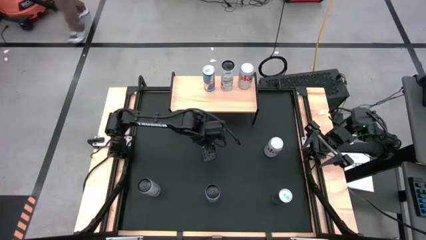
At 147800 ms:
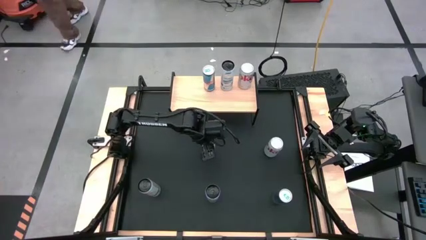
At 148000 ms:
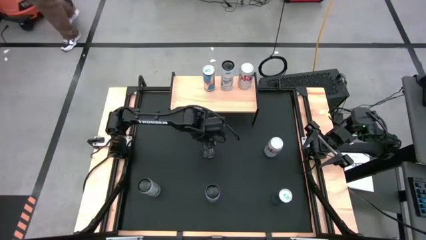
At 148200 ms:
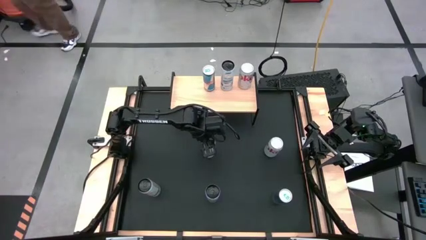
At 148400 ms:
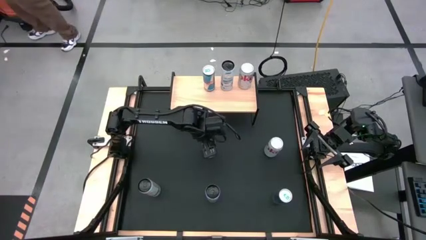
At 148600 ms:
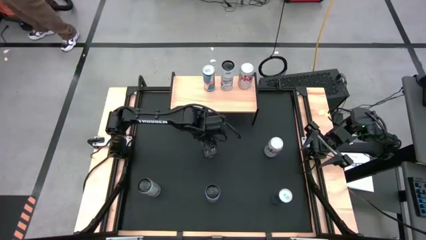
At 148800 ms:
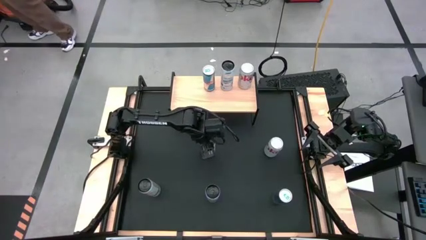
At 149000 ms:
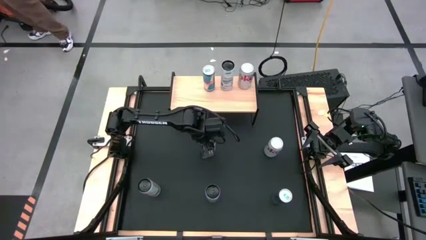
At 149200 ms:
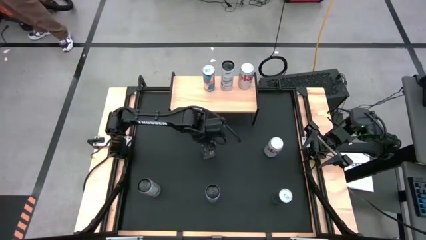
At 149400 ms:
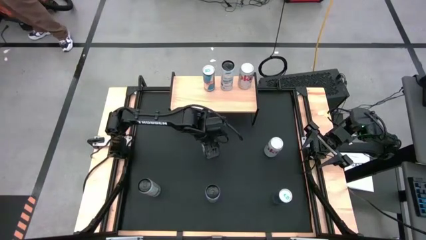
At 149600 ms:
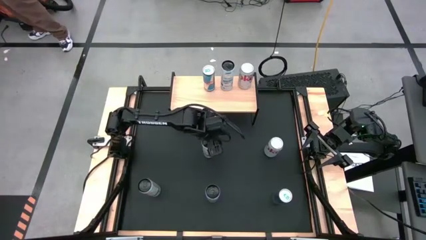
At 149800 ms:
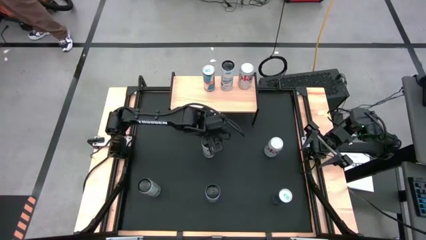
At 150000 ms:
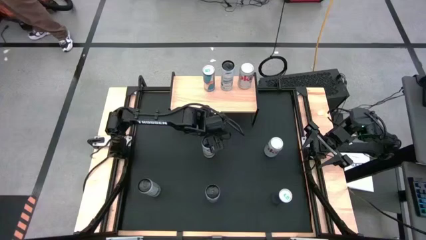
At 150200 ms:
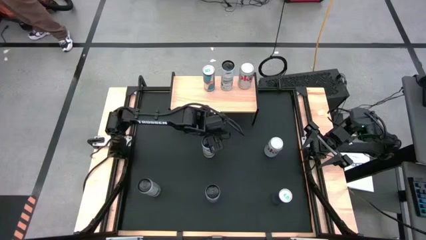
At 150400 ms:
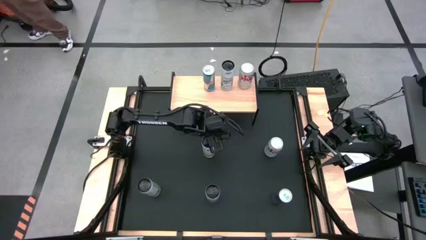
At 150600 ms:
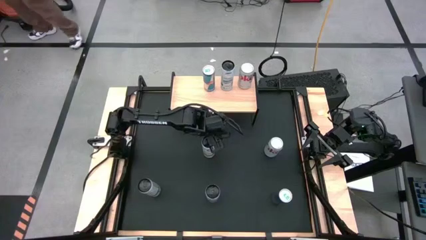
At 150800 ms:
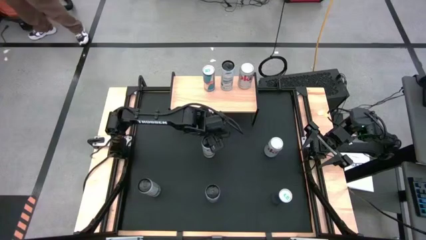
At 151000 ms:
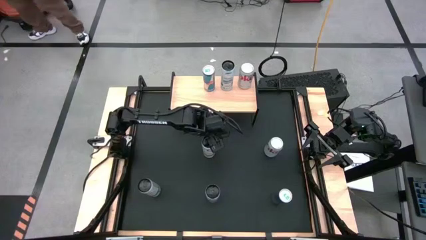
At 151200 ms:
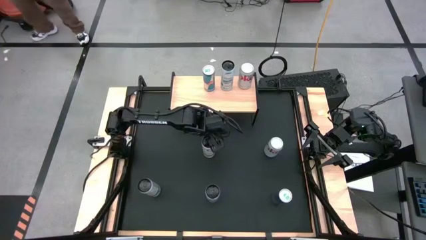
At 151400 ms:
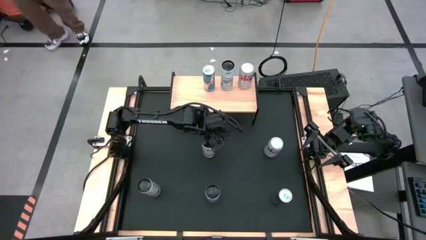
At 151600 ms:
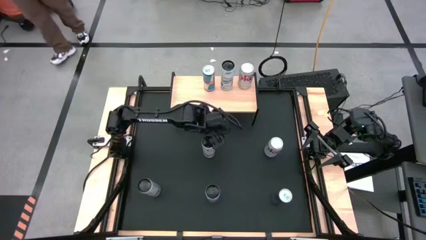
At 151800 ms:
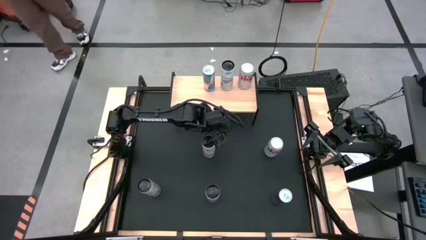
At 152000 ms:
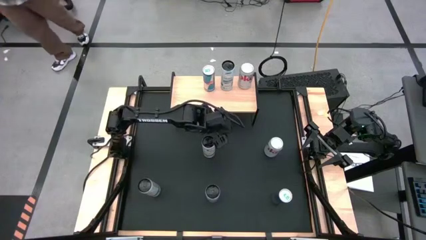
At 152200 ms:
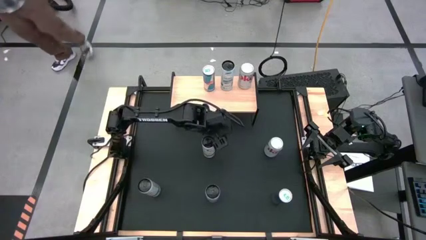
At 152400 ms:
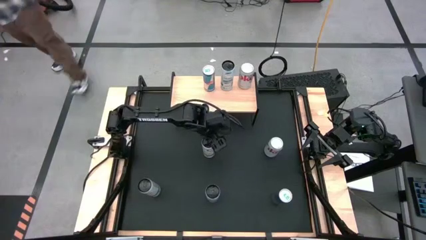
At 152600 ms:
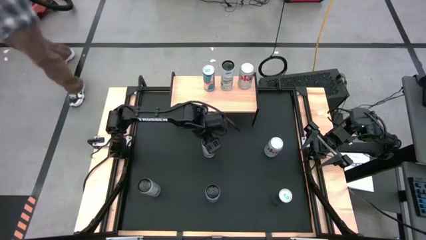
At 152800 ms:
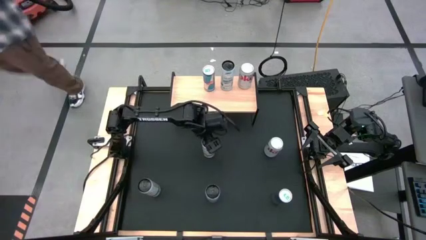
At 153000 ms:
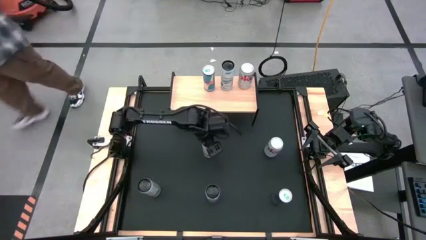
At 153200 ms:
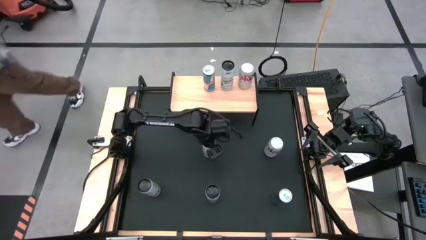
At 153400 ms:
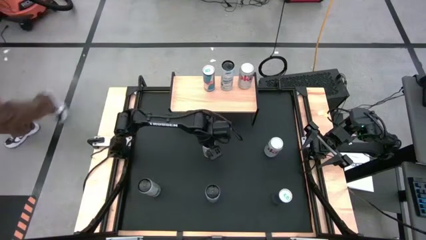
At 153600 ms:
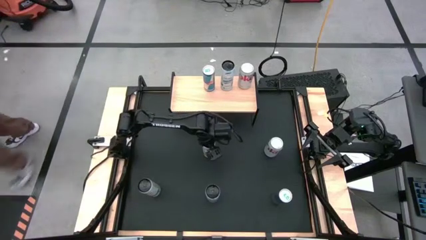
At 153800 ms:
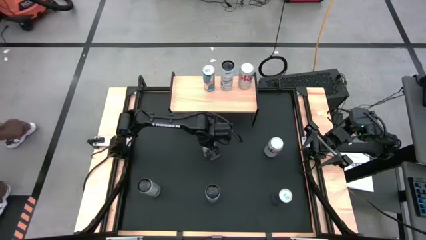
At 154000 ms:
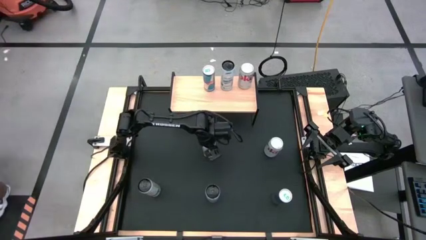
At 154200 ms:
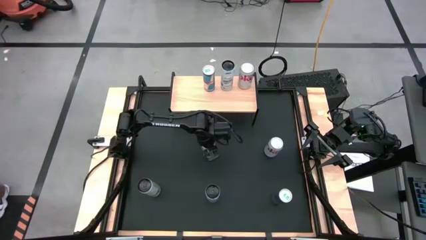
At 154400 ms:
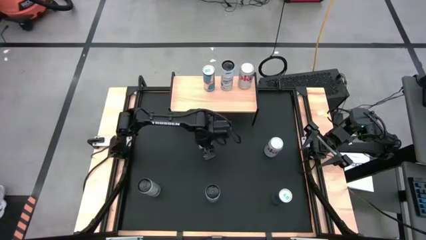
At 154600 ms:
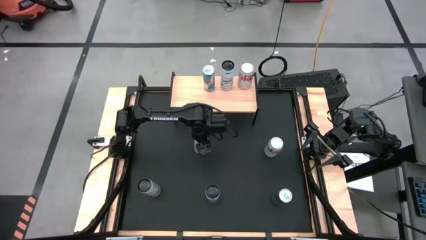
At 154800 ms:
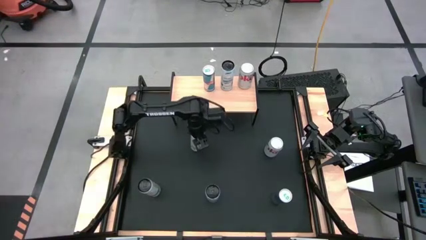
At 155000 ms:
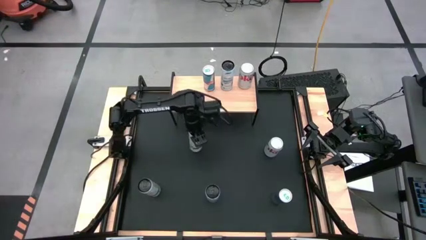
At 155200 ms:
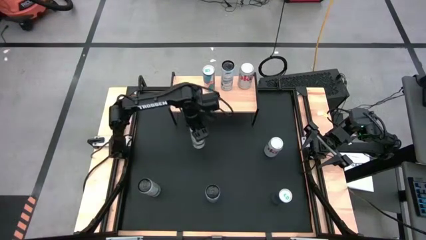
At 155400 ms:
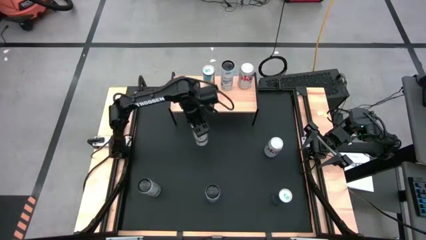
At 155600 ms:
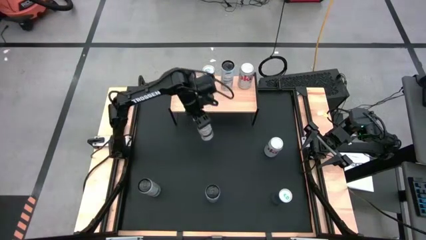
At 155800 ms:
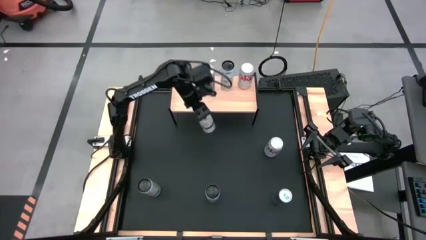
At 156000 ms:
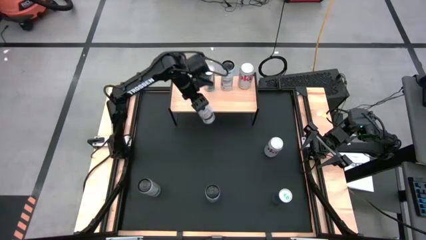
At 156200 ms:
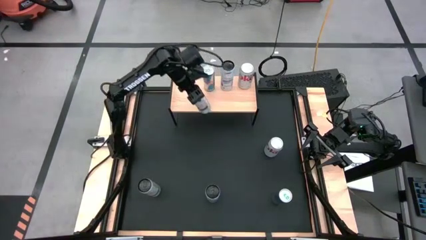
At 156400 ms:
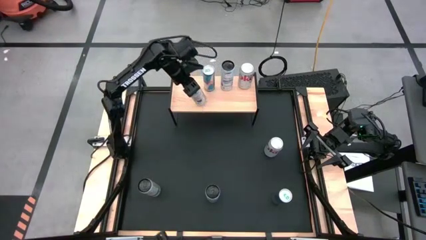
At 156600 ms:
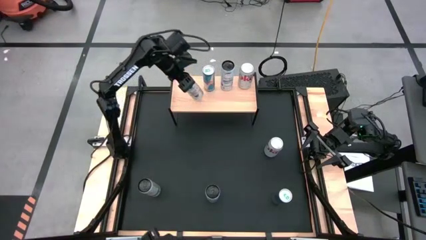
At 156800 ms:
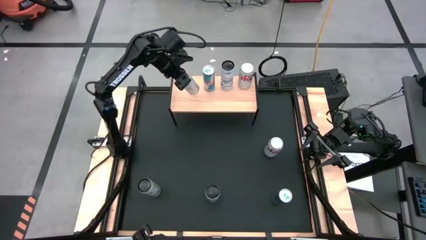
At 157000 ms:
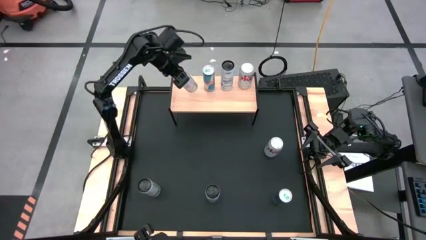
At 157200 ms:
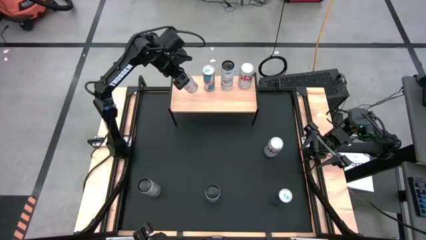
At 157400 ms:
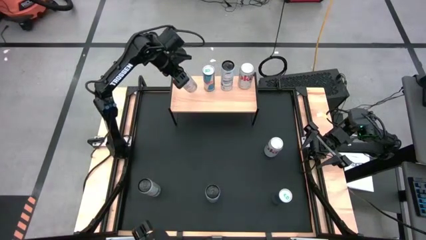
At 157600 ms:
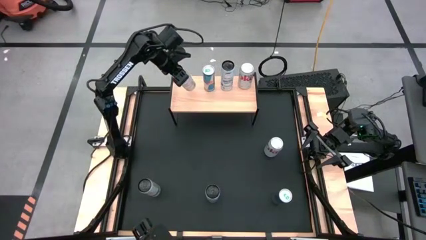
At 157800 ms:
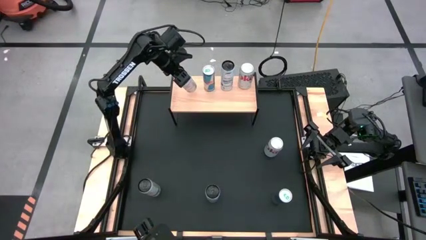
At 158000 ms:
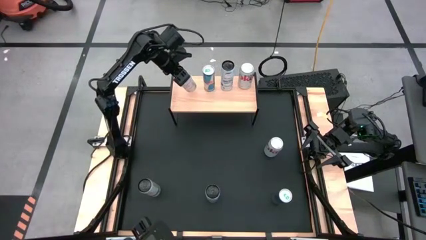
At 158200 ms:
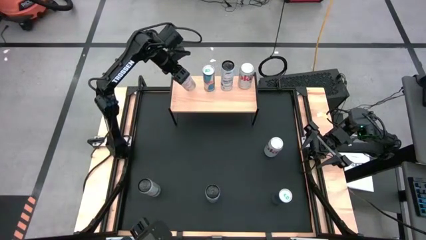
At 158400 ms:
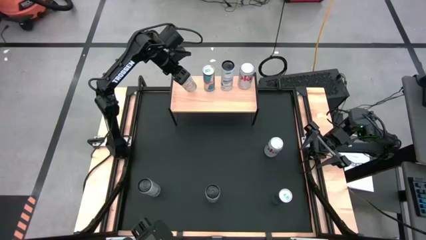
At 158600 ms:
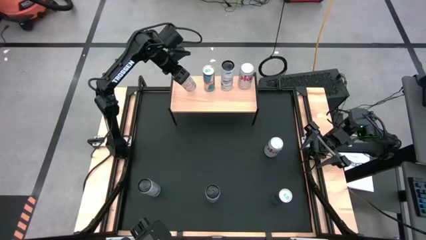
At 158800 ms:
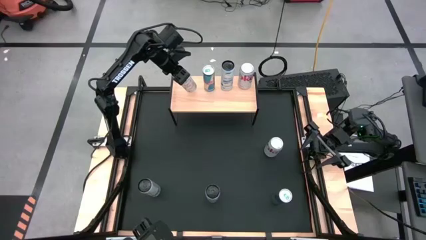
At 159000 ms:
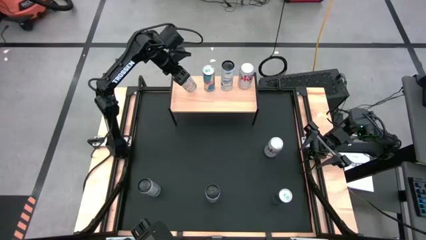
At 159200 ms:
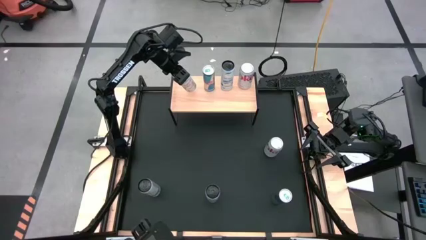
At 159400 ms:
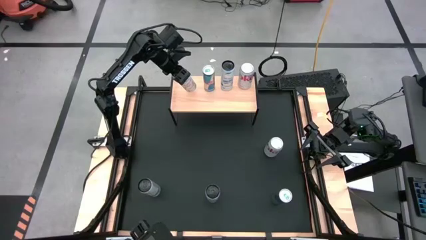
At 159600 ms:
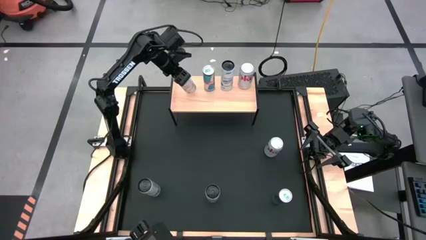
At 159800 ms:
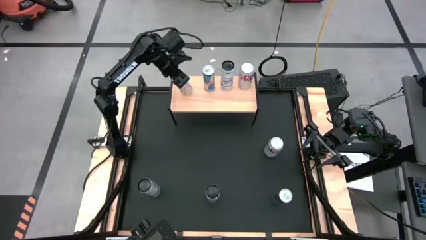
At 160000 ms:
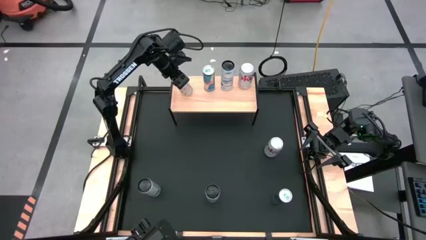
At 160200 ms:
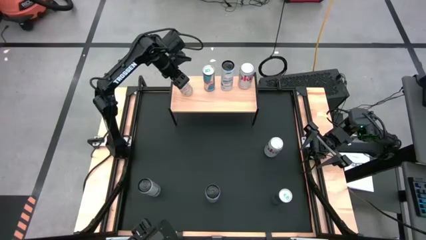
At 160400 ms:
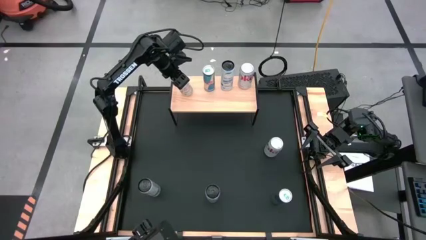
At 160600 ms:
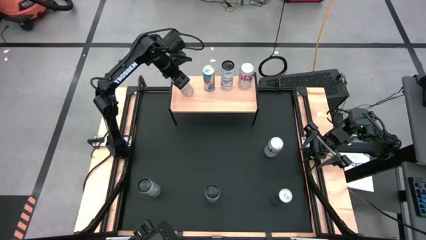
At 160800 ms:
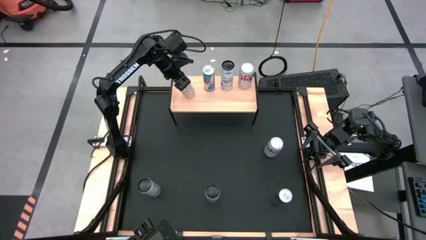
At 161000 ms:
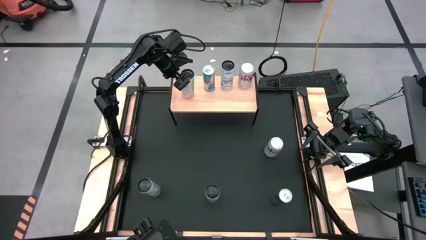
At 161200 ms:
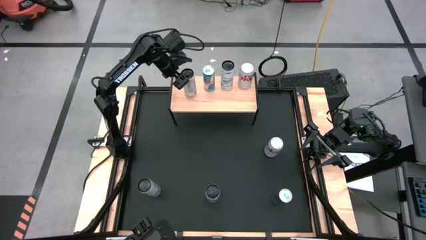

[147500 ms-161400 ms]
Task: Place canned beverage on shelf
Put the top right white and black soda can on the shelf

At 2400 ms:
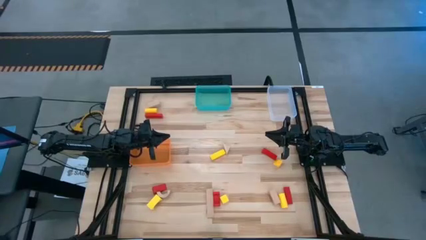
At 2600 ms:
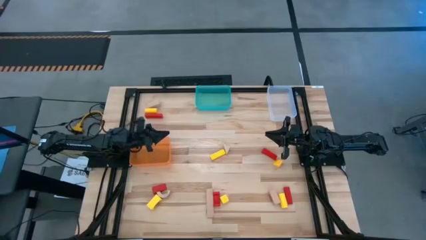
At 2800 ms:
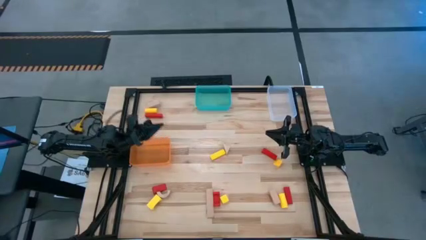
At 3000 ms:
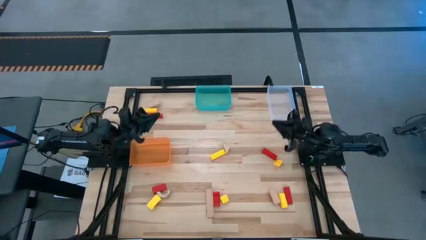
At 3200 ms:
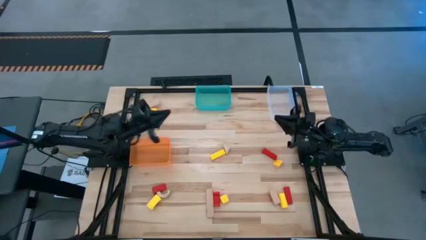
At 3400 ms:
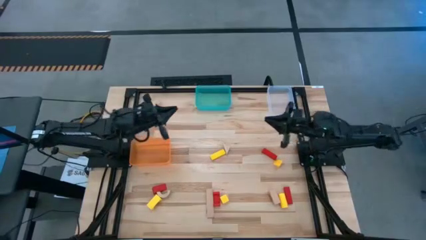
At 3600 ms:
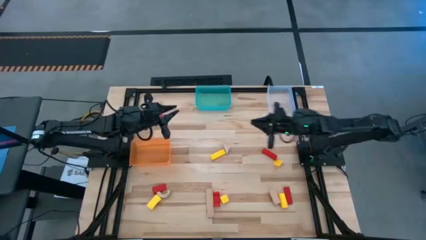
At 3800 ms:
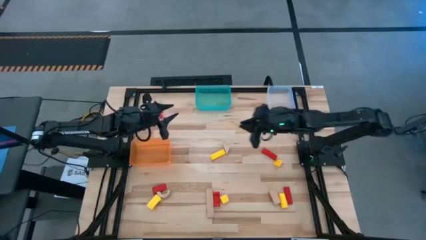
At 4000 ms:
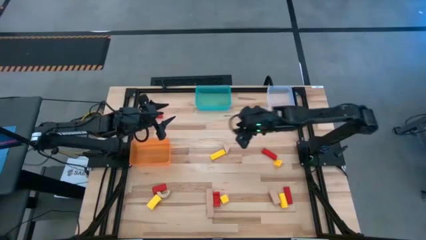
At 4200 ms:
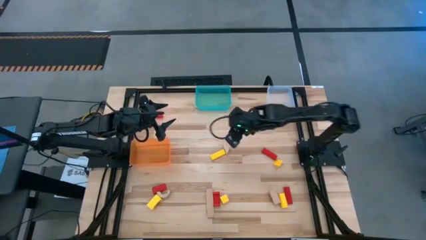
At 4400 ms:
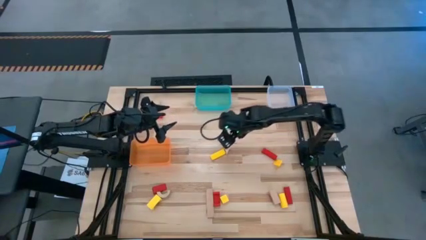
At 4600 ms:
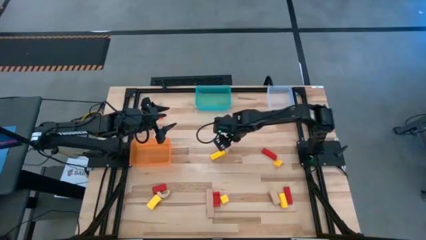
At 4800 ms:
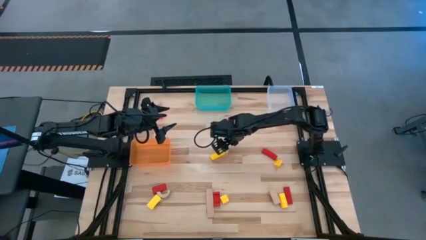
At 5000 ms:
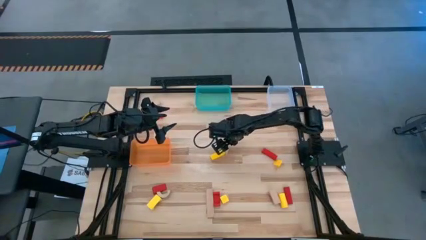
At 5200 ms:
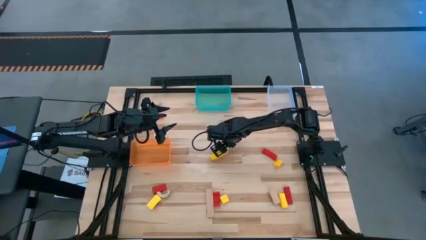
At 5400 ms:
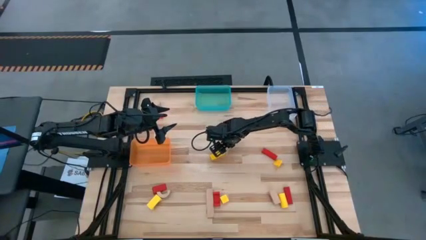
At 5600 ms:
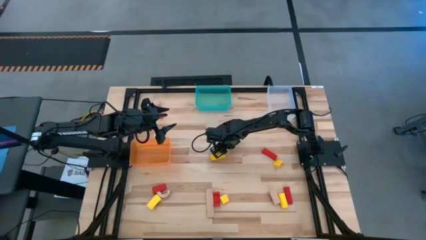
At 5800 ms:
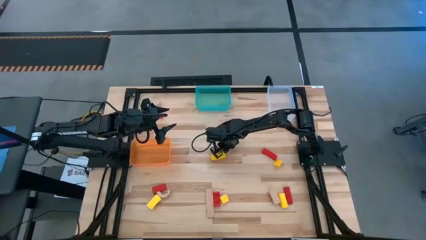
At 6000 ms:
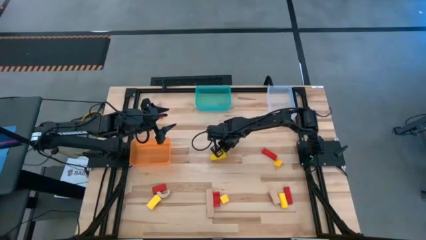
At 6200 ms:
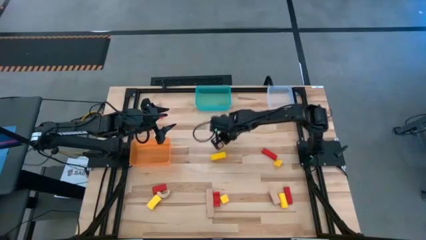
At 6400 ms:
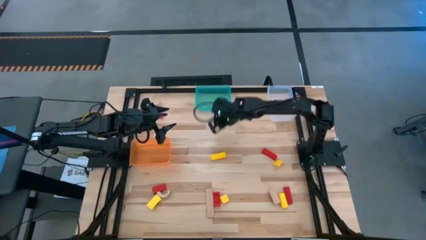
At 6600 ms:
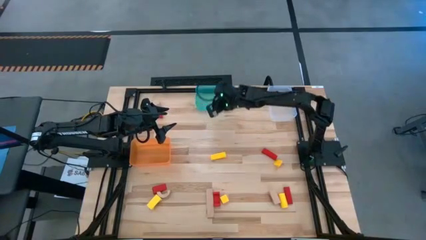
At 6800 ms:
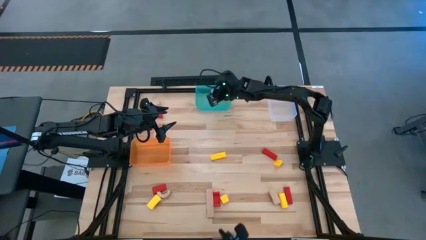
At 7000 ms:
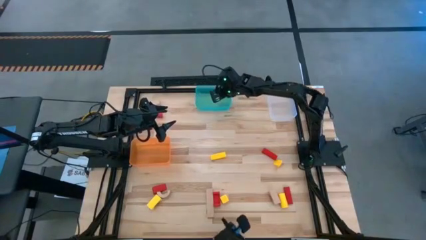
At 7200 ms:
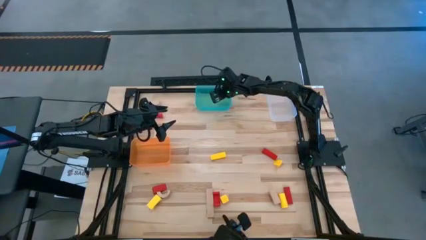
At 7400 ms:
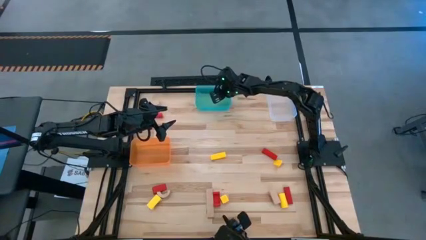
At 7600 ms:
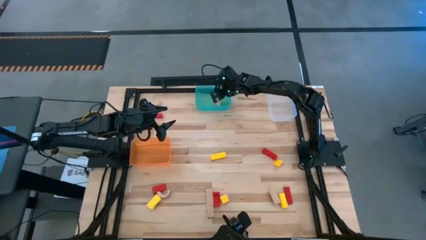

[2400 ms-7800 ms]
Task: Sort & place blocks by color
Put the brown block into the transparent blue bin
